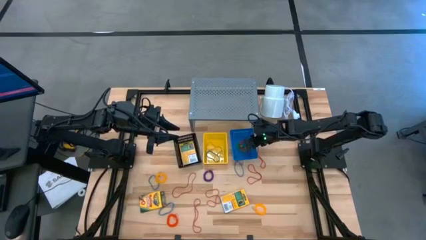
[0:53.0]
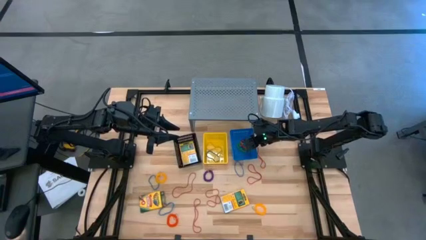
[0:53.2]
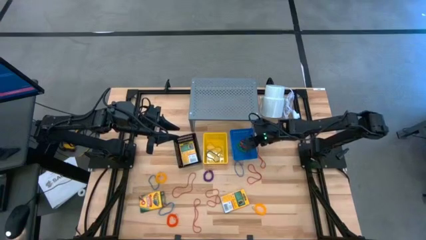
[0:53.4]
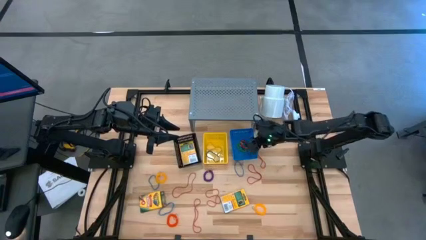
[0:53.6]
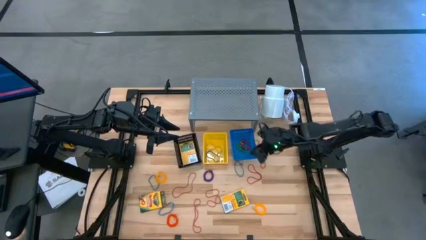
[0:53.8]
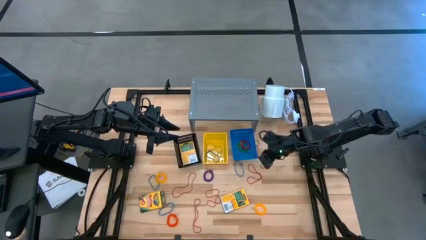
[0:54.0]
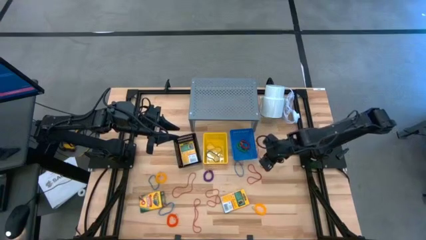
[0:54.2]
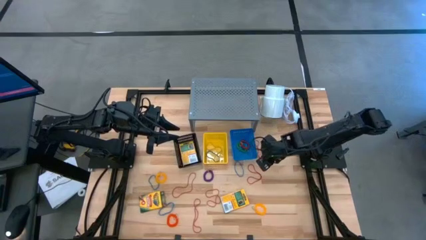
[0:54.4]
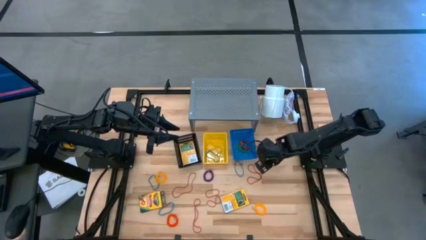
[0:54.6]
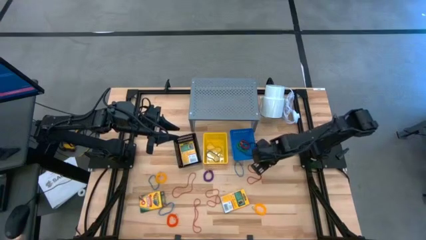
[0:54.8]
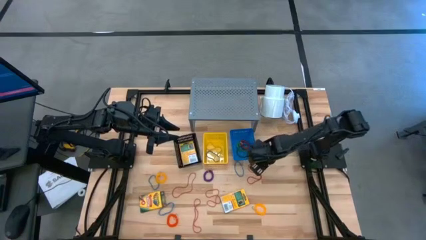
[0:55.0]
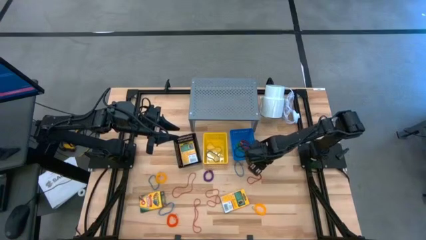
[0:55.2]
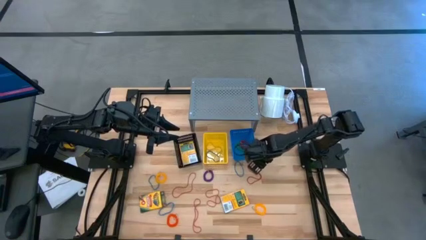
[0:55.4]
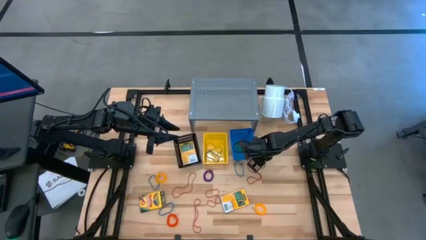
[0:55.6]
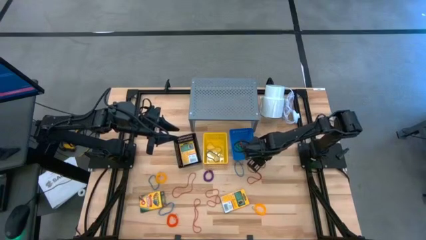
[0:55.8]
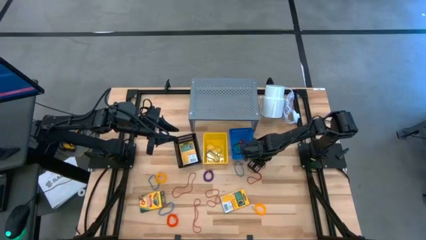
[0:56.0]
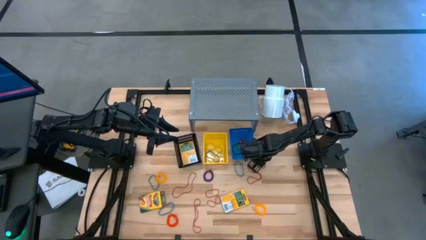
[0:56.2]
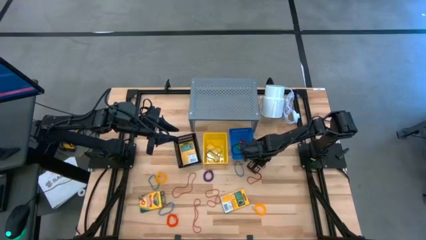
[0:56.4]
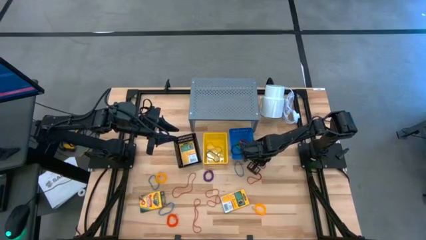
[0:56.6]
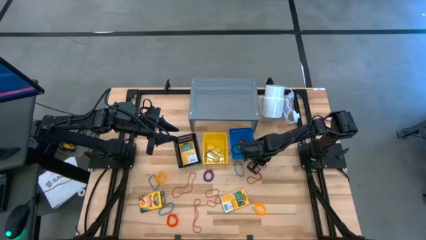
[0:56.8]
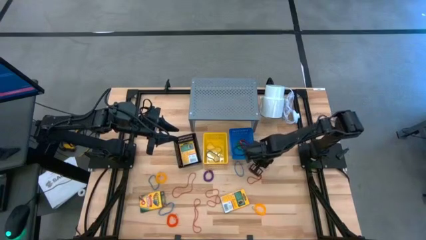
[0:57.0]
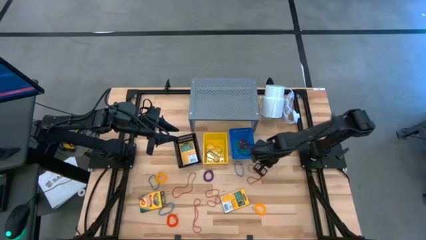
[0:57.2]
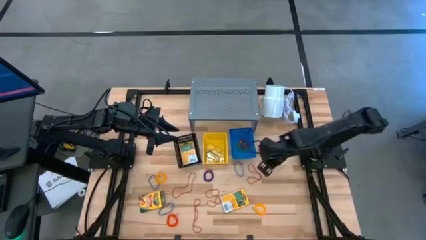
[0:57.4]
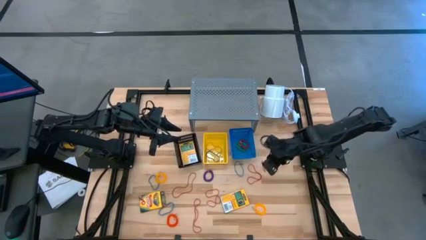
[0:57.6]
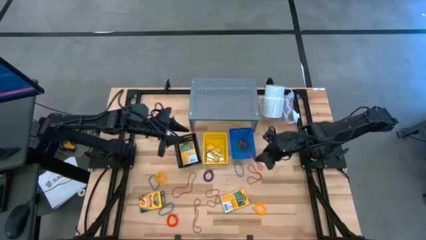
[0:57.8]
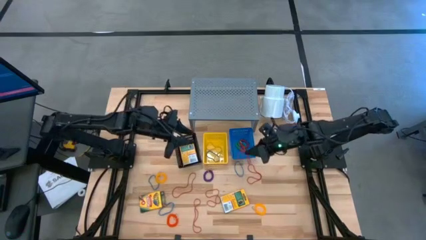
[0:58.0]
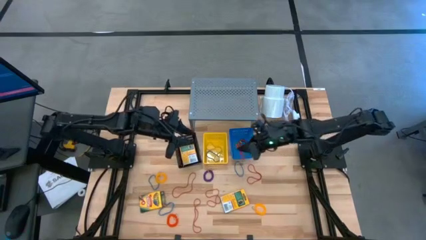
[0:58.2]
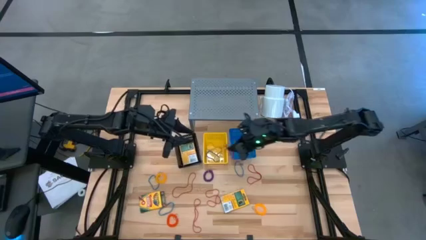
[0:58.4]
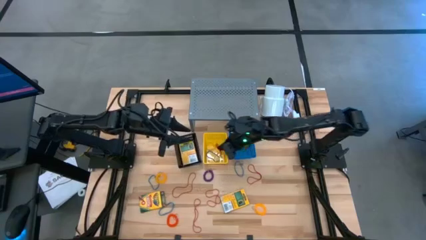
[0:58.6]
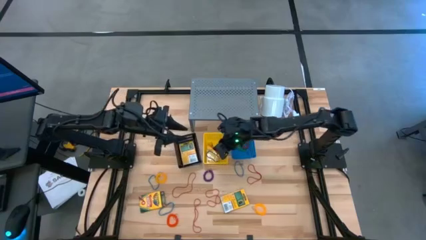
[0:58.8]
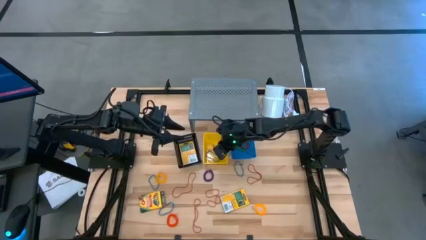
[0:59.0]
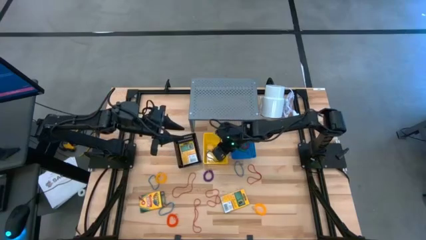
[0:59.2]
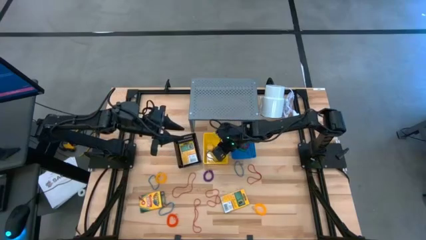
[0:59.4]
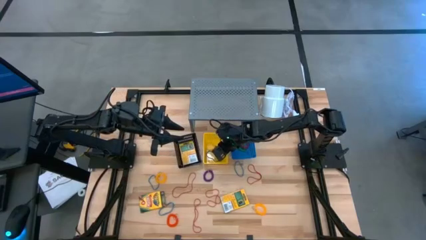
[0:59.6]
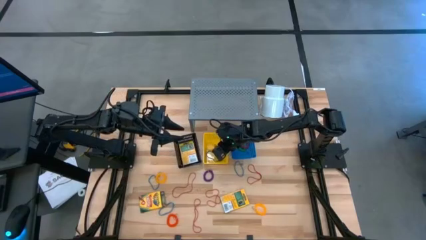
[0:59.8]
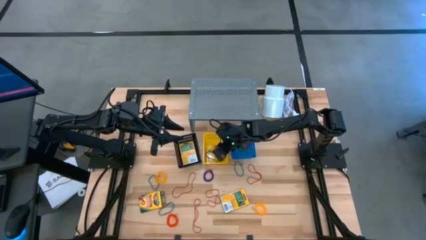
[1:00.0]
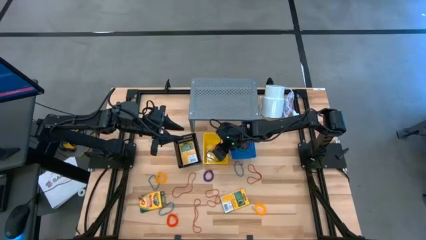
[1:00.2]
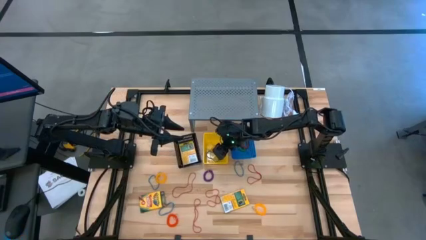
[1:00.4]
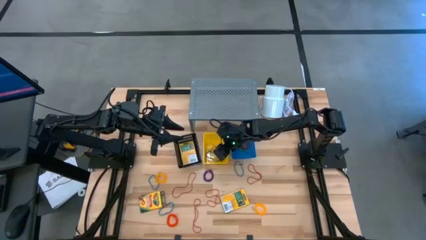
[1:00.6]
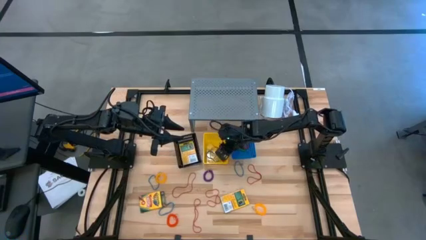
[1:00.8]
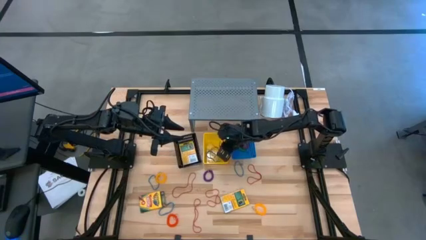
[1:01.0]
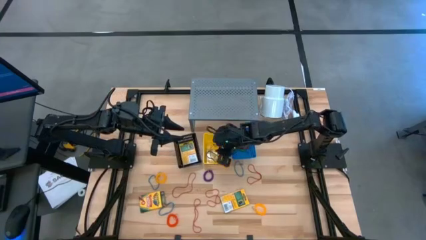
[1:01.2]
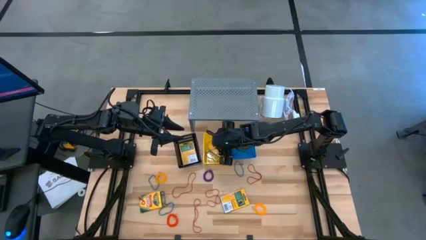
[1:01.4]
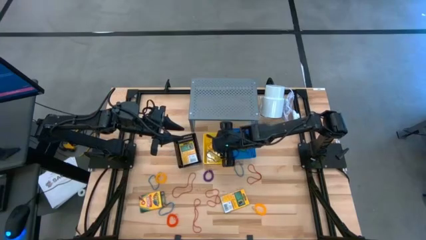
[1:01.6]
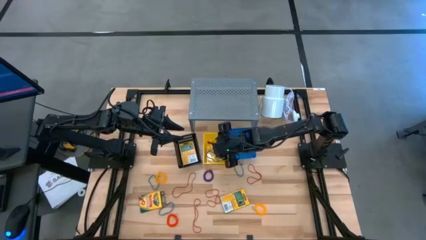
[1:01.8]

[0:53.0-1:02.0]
Task: Pick & Place Office Desk Supplies
Put the red rubber band into the yellow basket

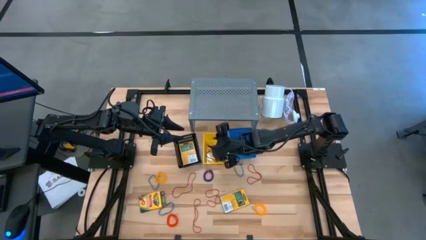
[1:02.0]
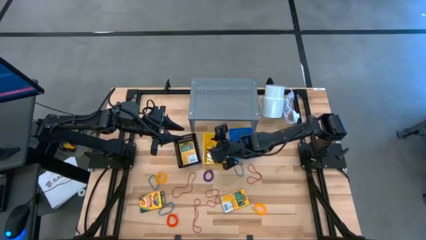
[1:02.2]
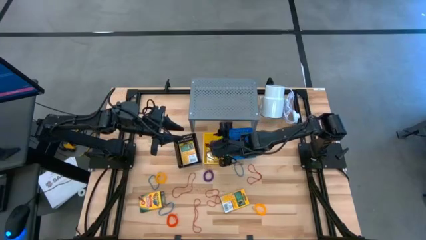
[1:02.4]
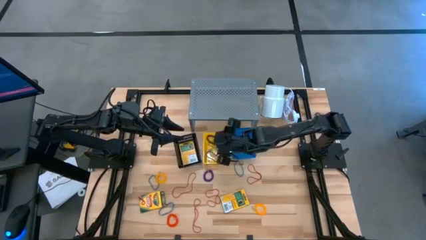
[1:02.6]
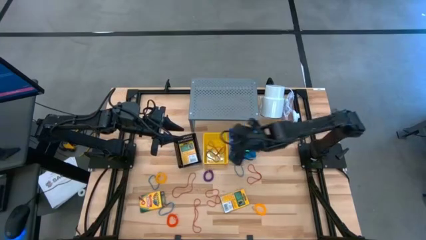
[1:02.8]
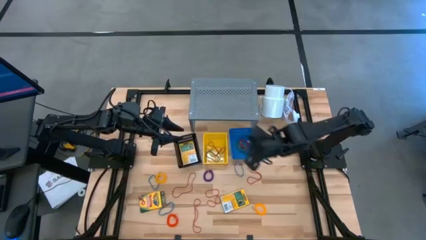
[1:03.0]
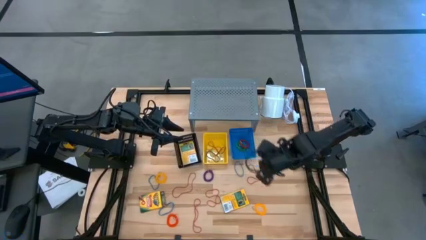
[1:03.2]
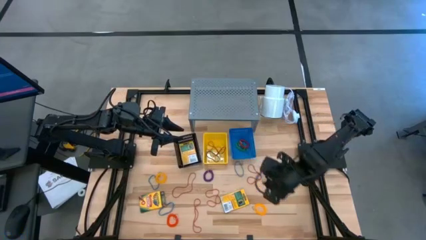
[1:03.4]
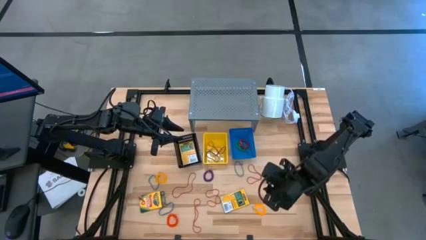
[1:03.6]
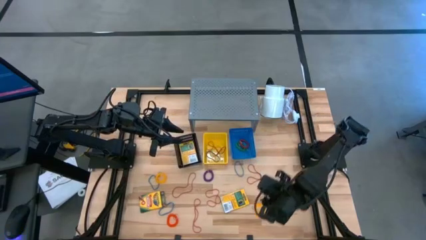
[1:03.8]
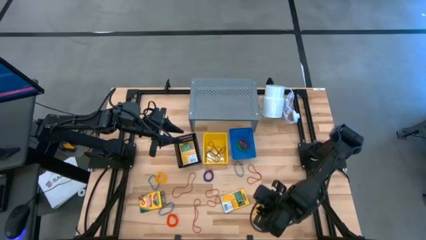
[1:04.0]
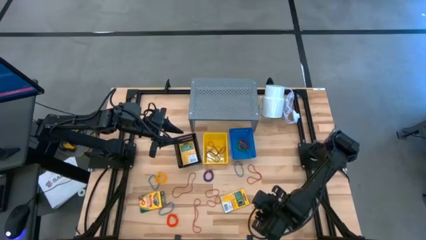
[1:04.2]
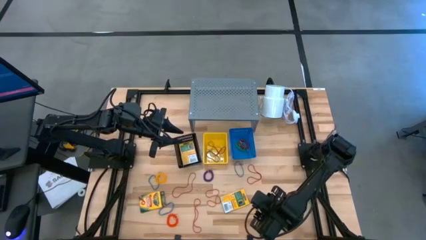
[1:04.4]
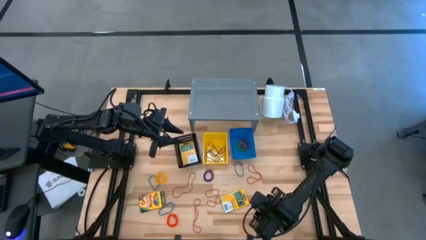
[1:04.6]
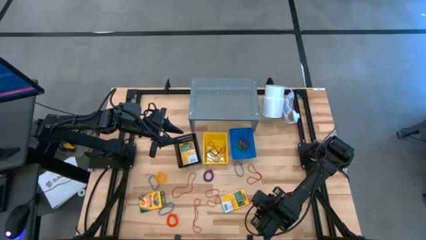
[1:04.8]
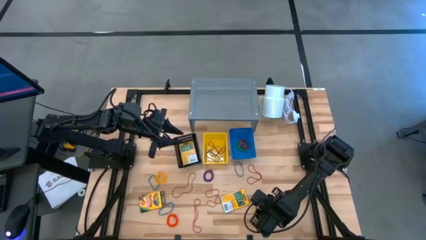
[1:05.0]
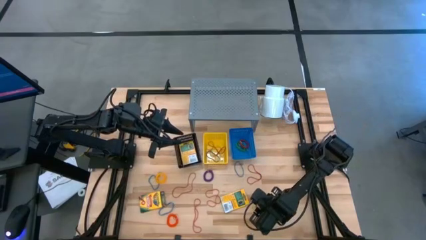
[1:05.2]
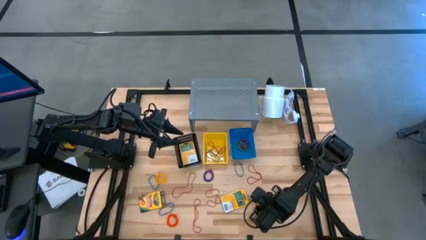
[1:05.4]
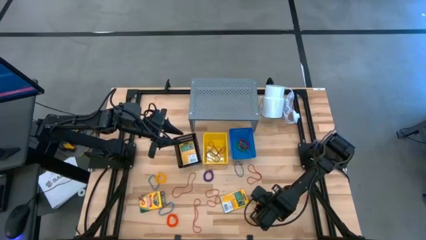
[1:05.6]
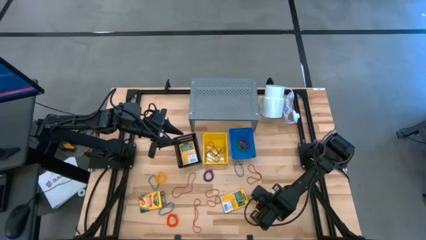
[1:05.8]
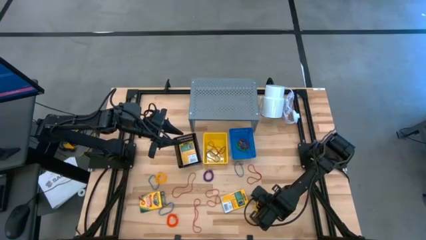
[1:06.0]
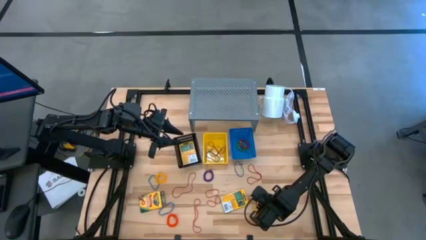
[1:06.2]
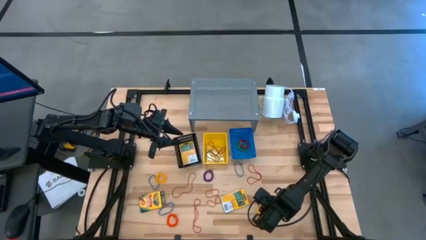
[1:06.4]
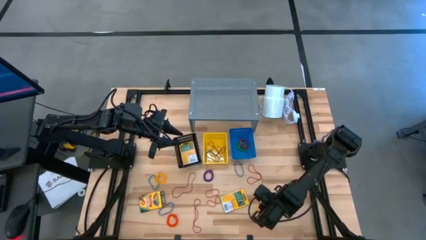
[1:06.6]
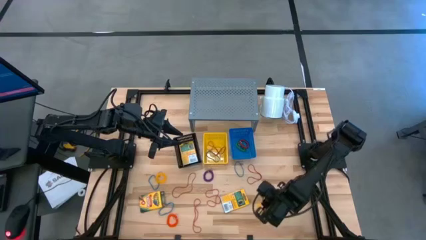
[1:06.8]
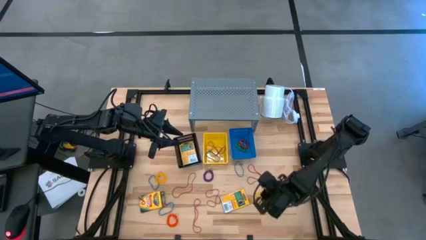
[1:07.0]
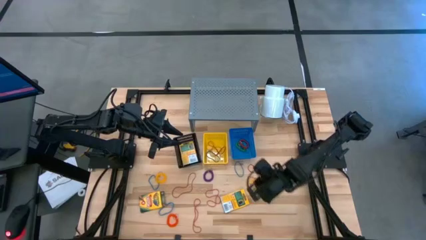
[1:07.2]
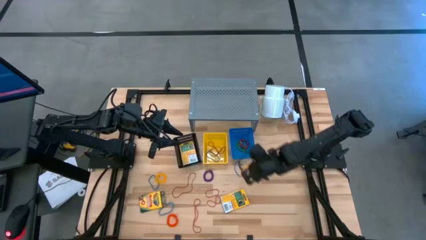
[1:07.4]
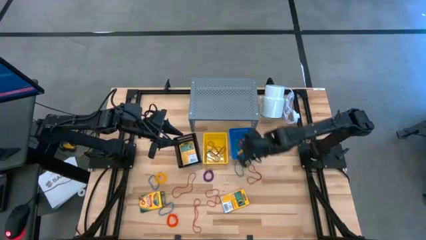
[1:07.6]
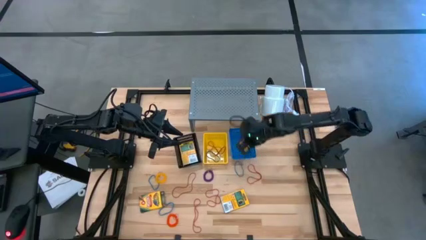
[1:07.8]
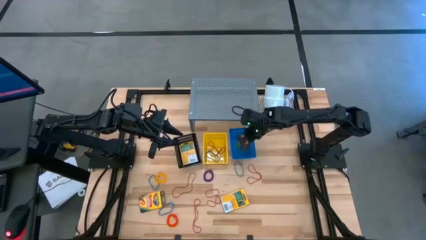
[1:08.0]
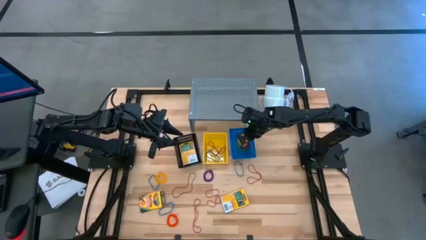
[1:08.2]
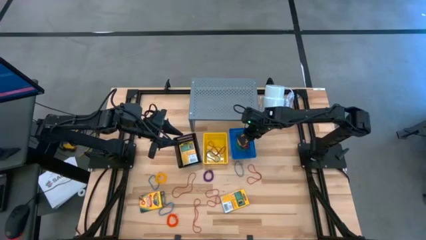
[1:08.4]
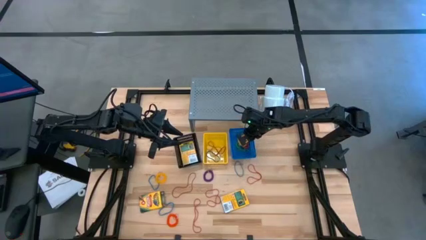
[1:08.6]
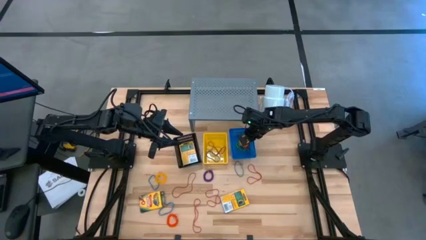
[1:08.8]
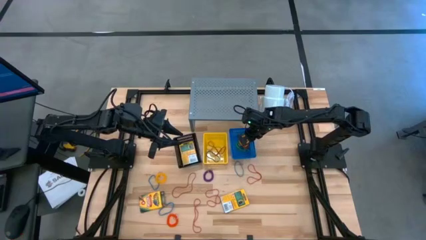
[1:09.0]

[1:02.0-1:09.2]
Put the yellow spring keychain into the blue basket

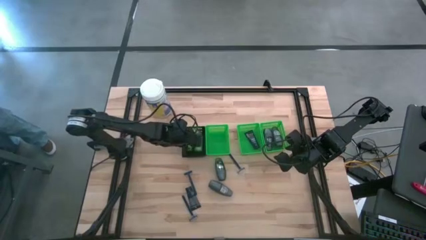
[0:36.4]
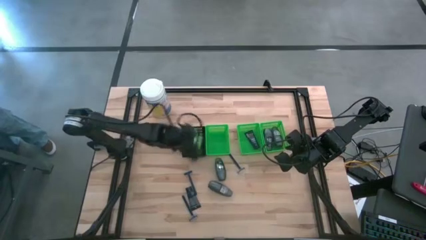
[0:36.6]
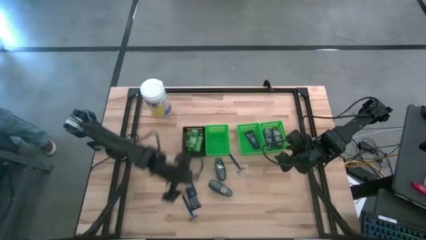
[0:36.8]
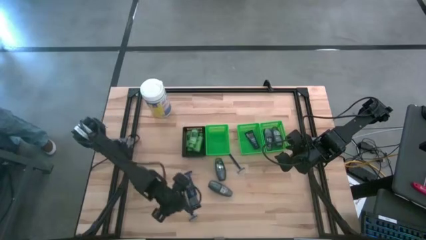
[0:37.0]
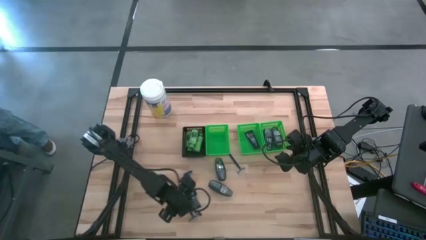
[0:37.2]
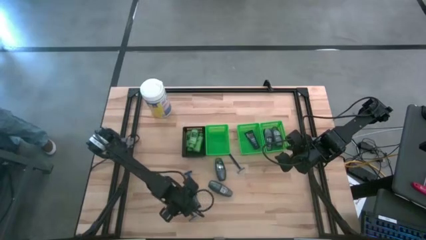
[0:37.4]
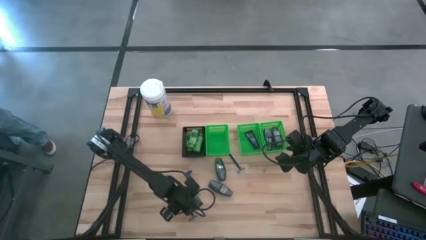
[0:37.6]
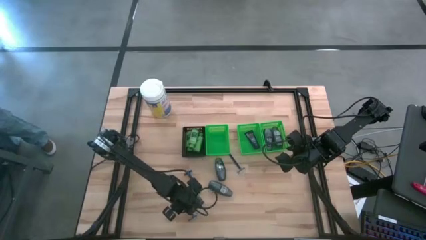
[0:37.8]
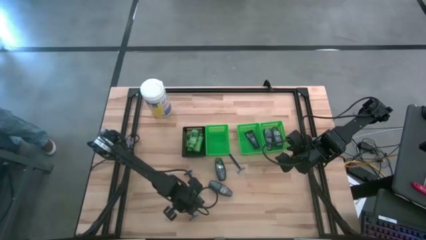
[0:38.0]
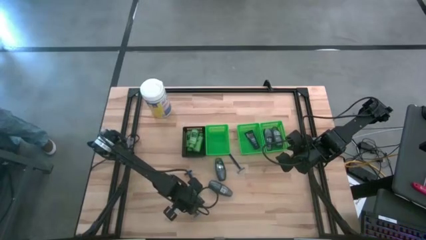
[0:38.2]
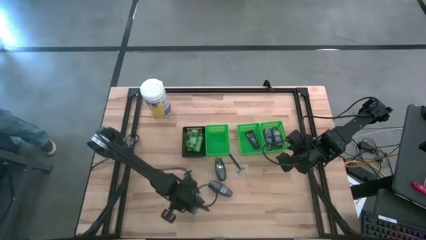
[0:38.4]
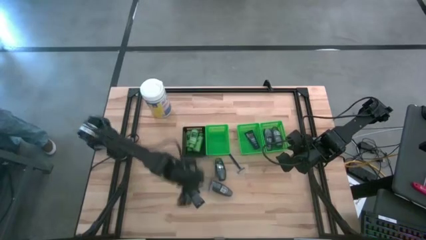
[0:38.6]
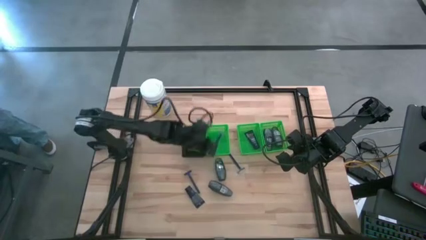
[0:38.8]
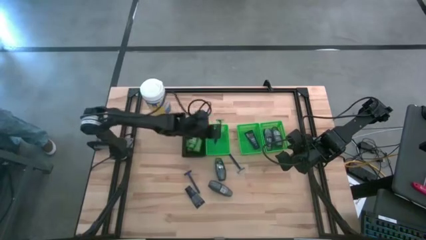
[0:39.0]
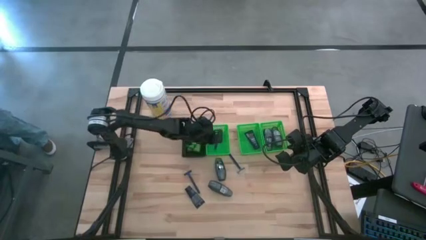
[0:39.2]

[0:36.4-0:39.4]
Task: Pick & Place Travel size toiletries
Put the blue razor into the left green bin
